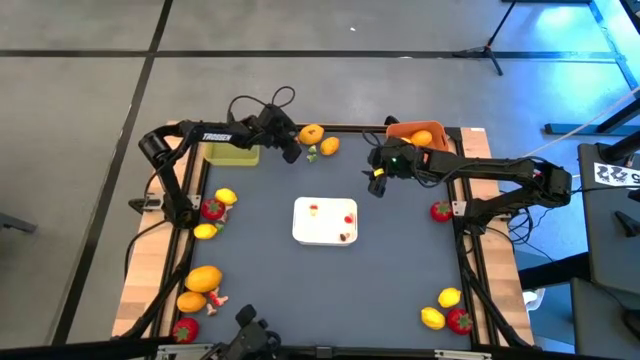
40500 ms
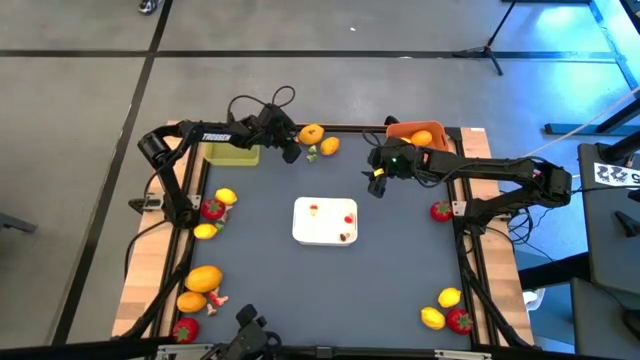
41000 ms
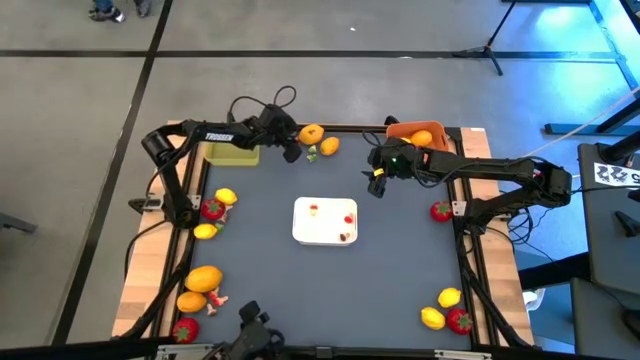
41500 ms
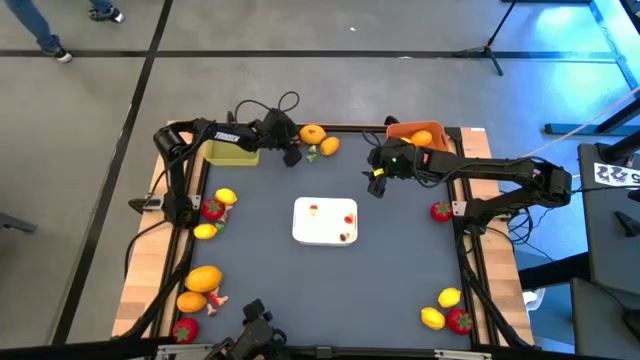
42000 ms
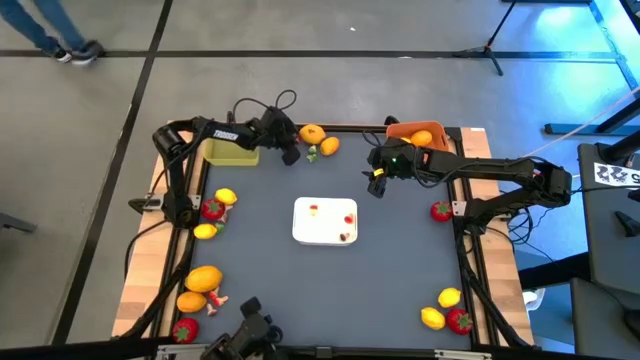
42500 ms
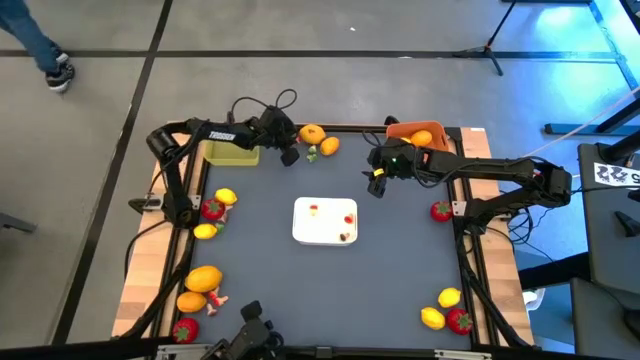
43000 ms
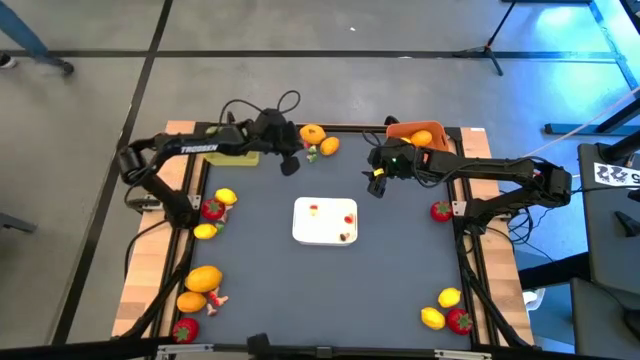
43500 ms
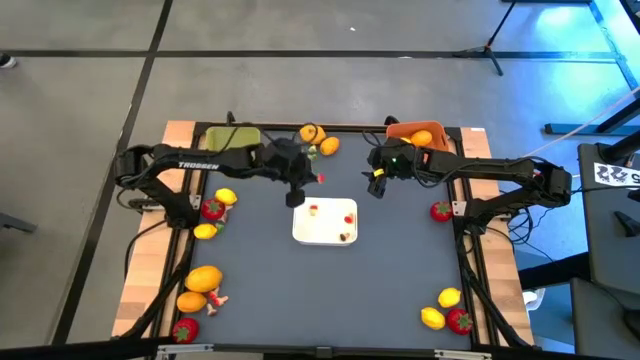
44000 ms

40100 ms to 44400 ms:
Task: Sort produce into baskets
Put the red mushroom into the white bin

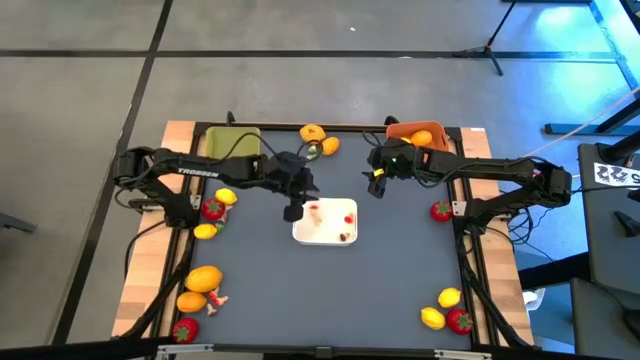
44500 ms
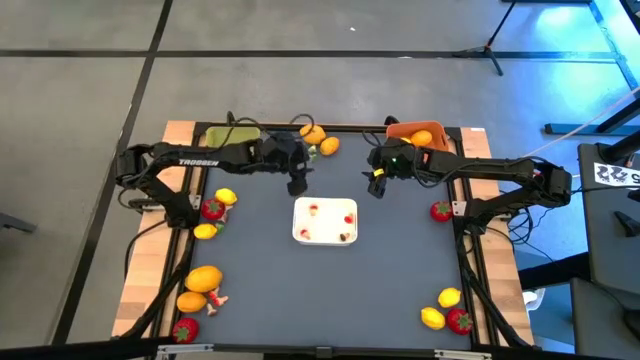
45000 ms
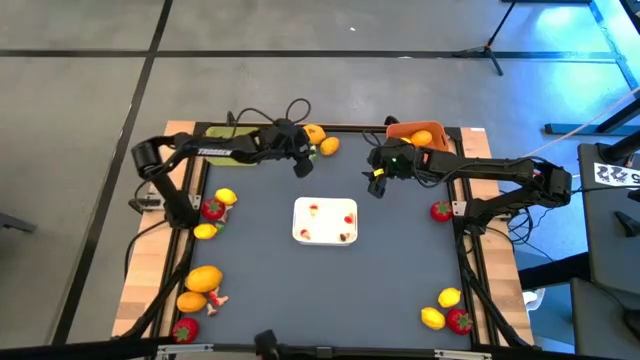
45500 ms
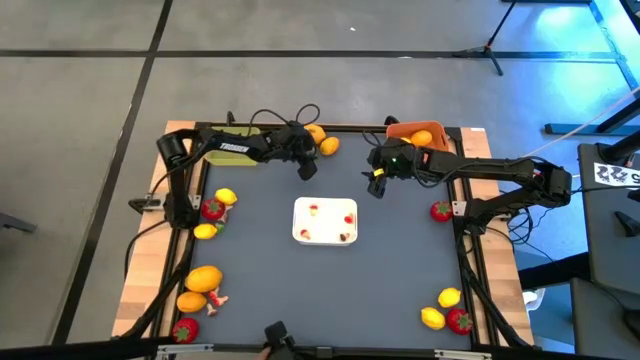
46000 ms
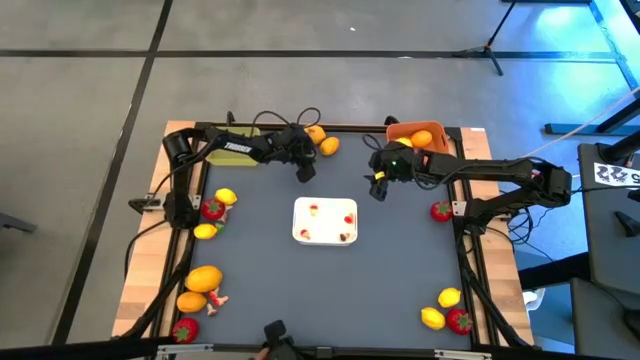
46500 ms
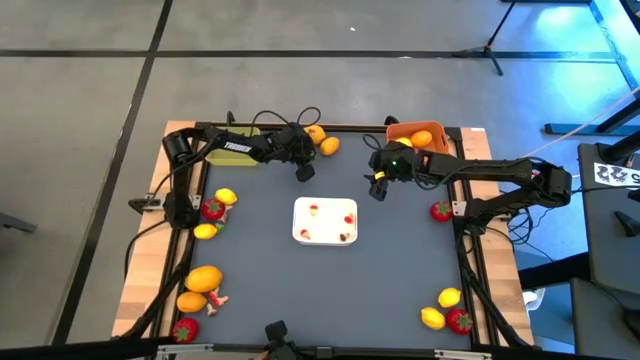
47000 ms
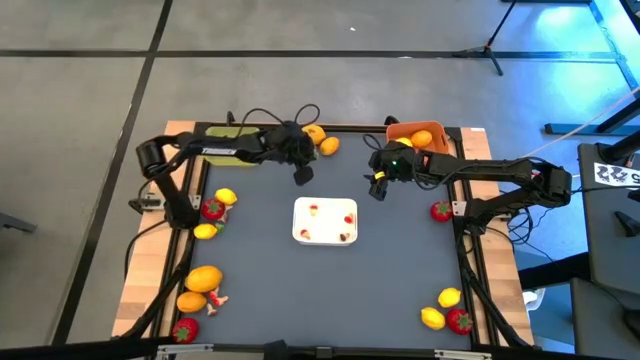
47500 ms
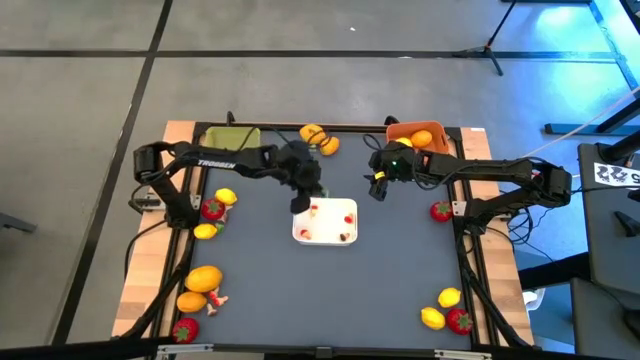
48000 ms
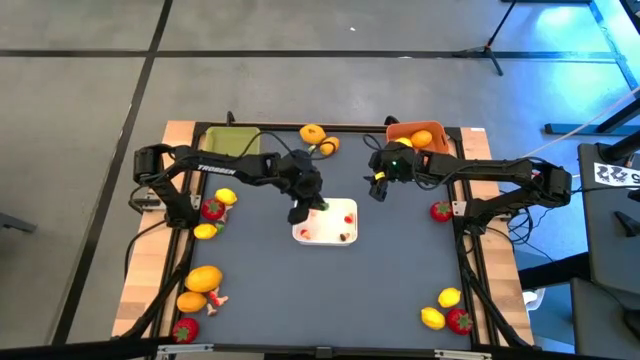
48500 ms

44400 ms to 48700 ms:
Put the green mushroom into the white bin

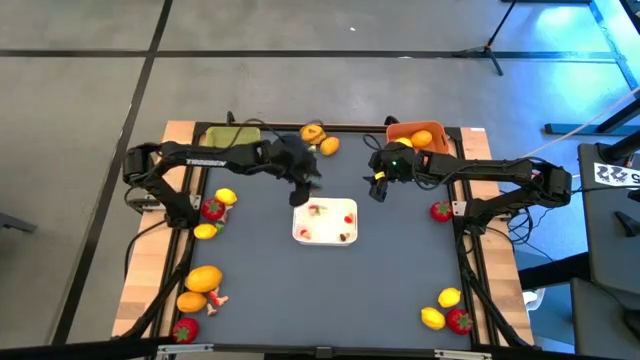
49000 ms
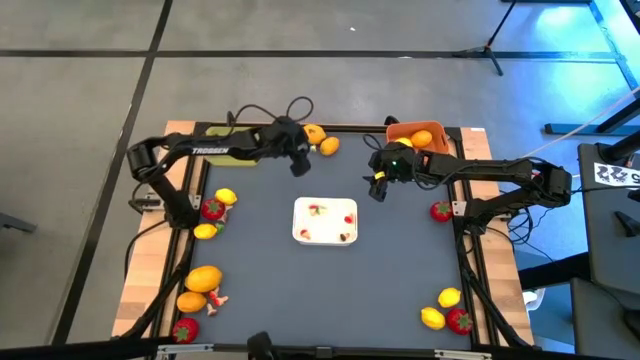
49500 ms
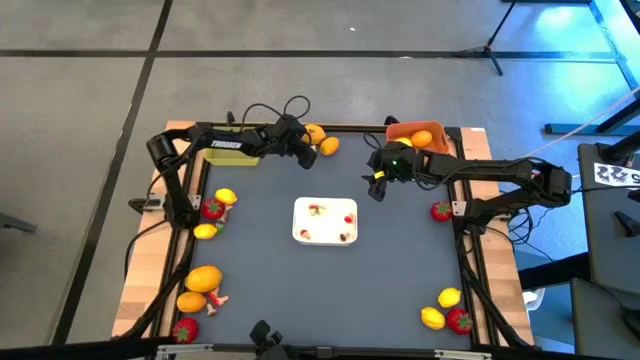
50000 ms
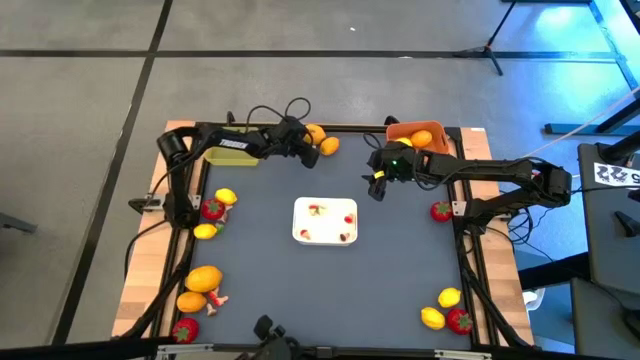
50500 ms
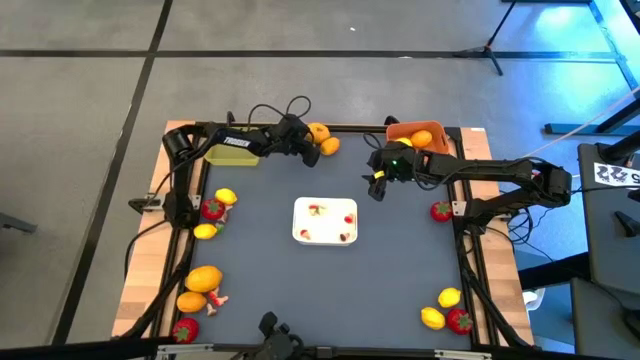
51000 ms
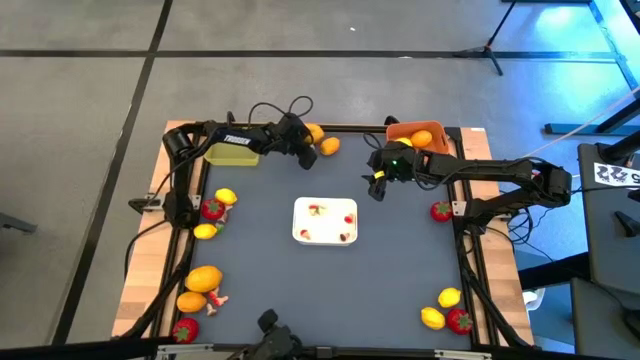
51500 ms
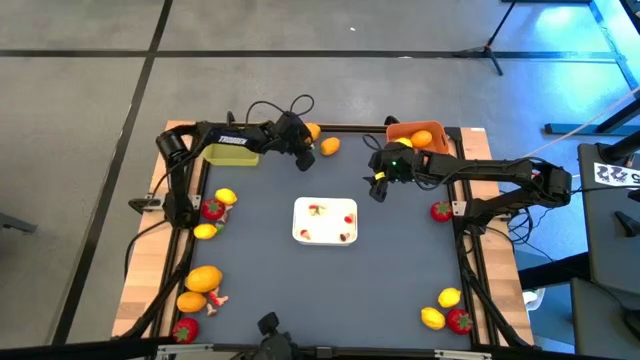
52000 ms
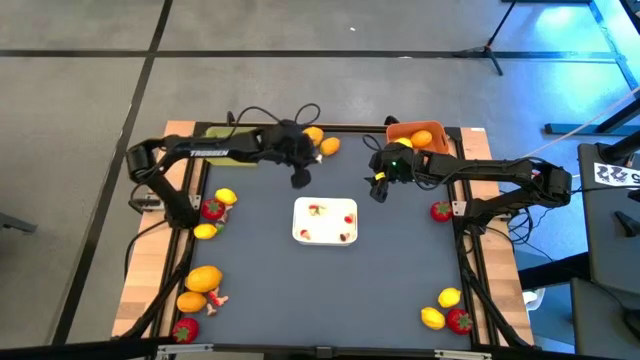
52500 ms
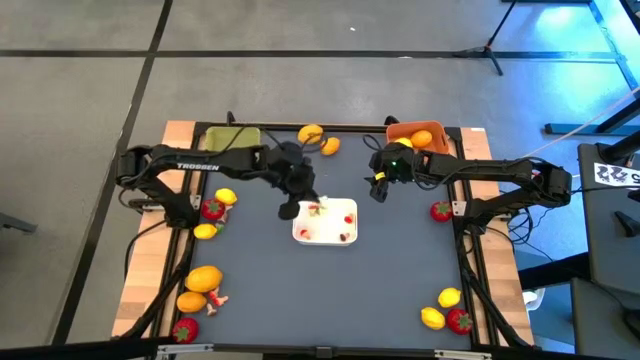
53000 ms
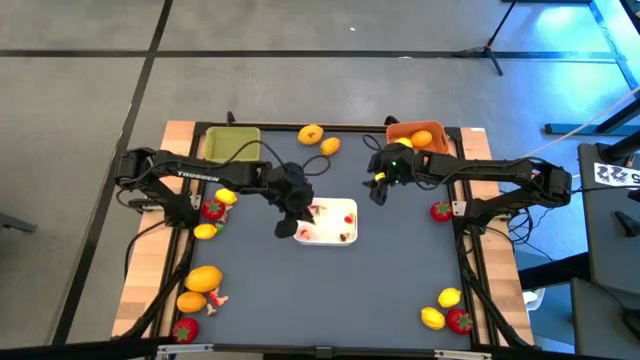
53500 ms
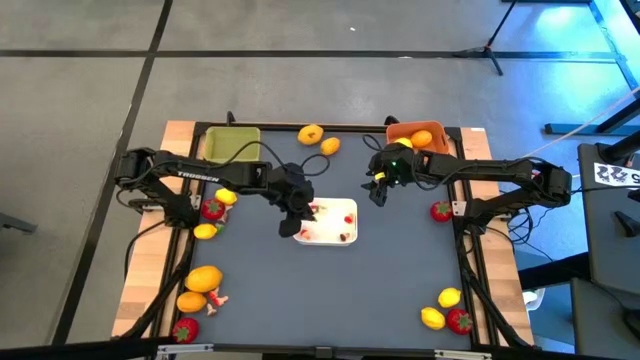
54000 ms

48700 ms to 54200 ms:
Put the green mushroom into the white bin

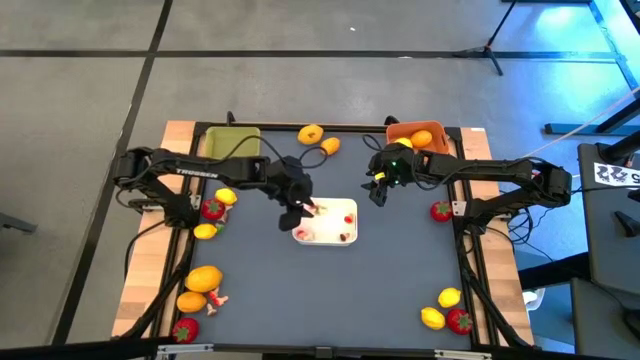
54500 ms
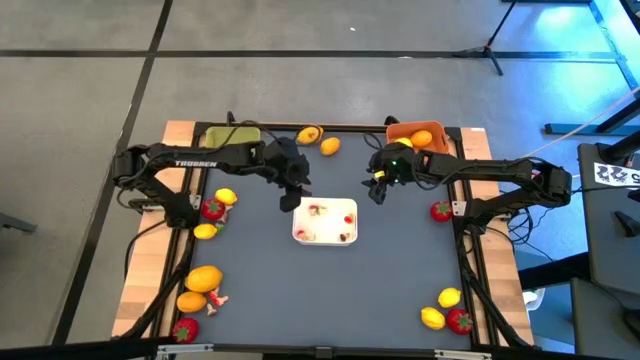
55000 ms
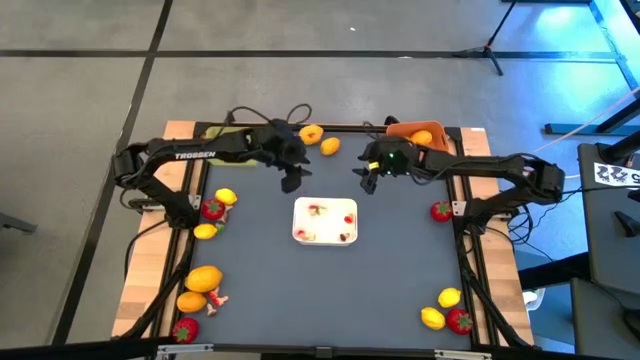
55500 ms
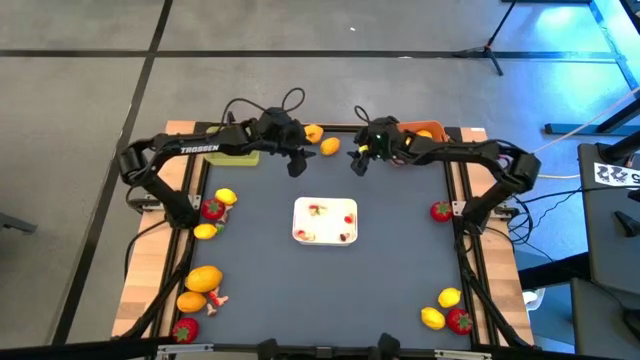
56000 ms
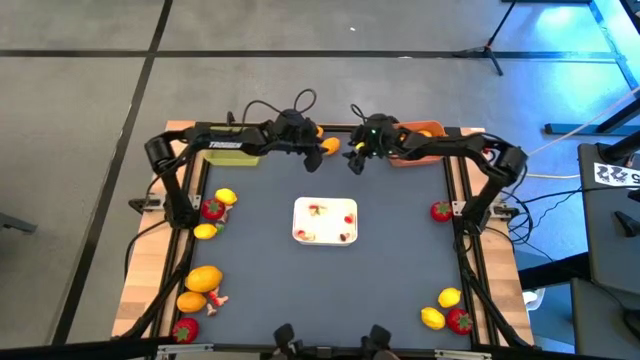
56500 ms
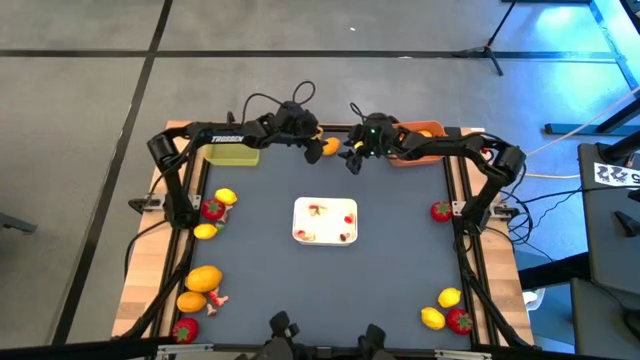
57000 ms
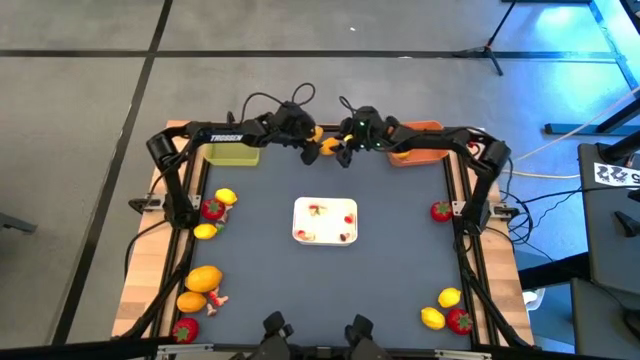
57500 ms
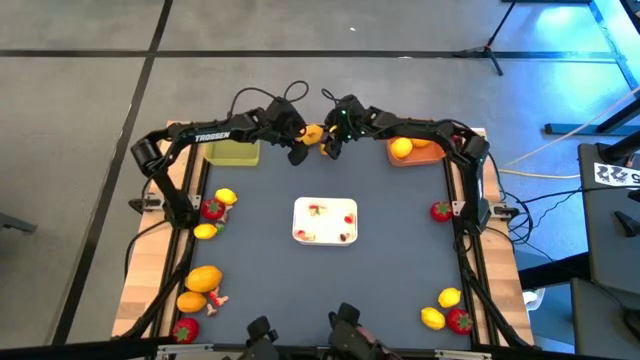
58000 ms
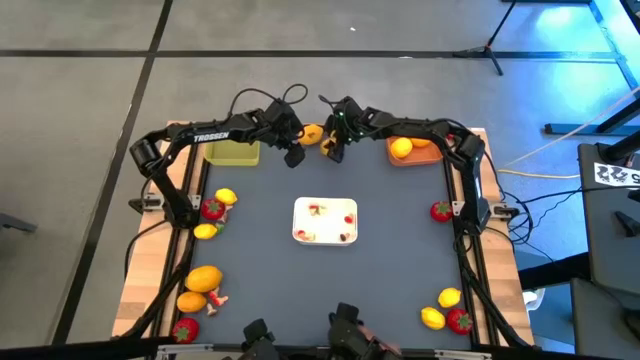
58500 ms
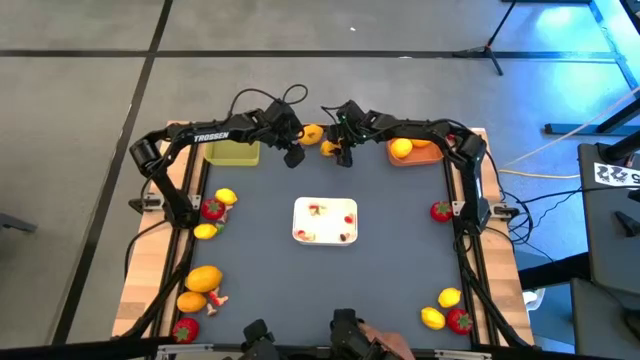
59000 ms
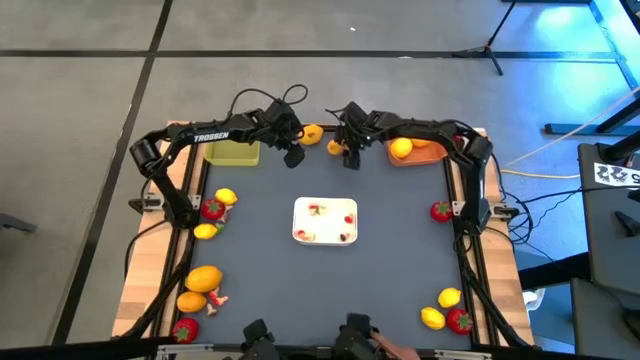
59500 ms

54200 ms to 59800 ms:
Put the yellow lemon into the orange bin

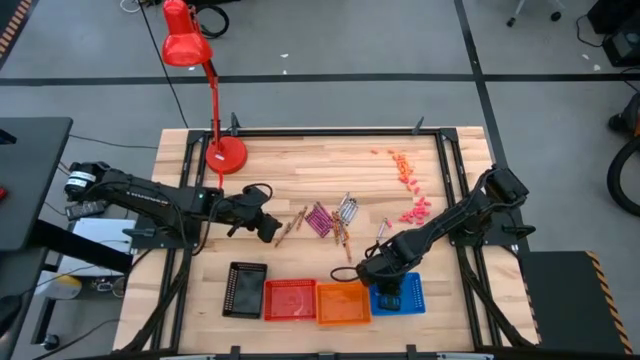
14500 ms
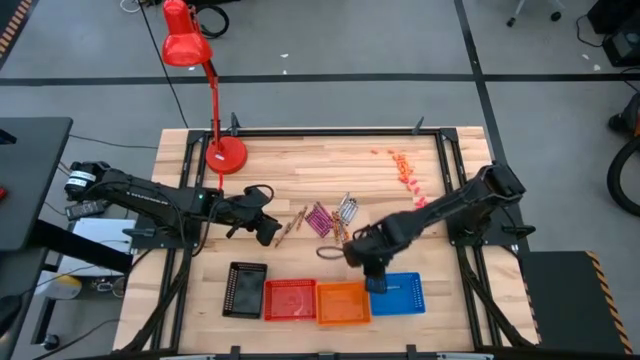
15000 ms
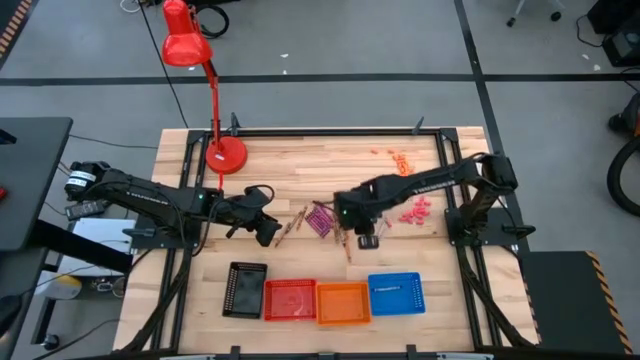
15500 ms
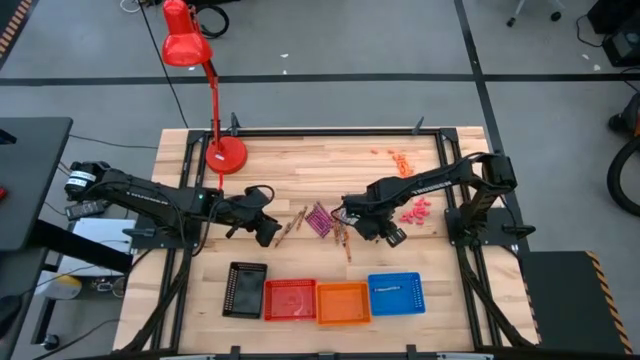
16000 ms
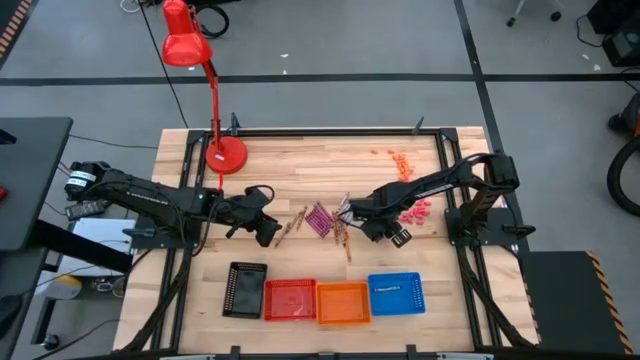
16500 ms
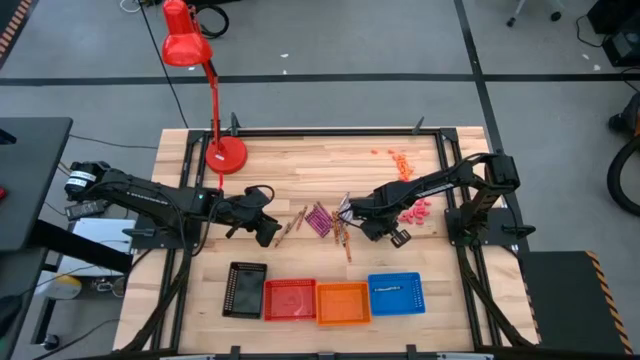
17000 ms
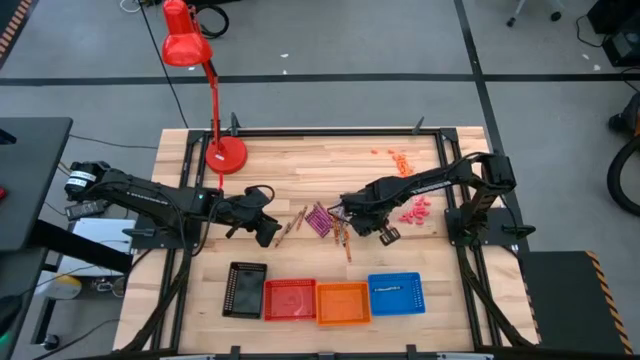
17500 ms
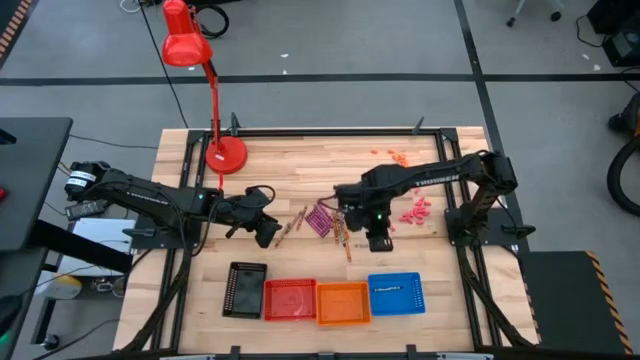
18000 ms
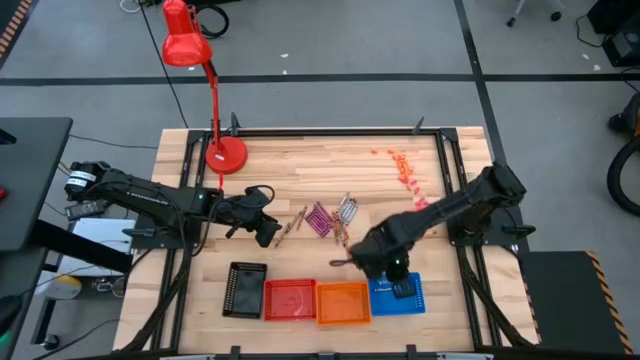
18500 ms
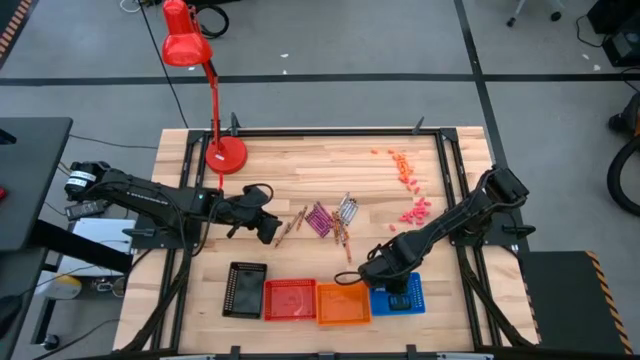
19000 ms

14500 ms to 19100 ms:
Task: Sort crayons
Put the black crayon into the blue bin
